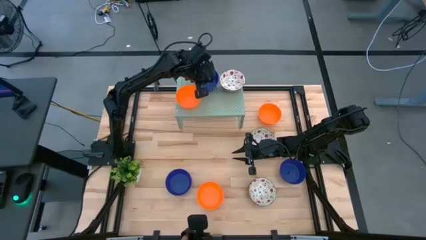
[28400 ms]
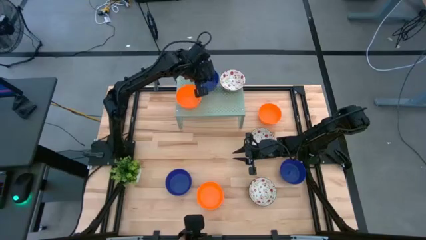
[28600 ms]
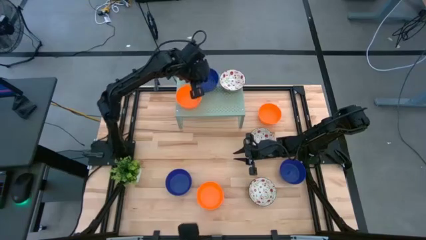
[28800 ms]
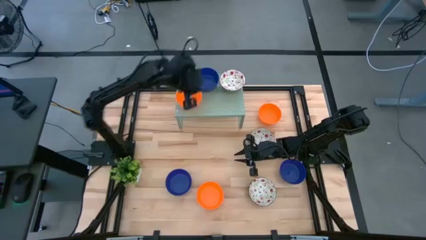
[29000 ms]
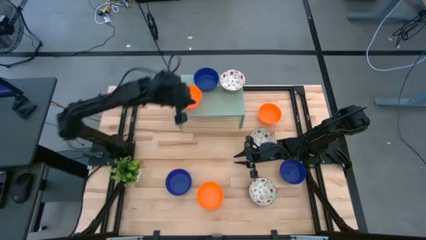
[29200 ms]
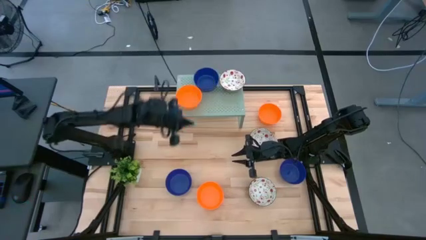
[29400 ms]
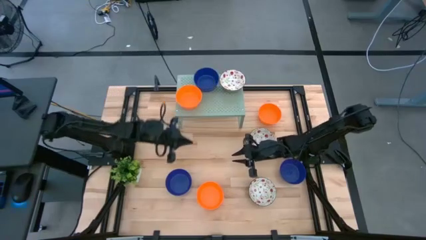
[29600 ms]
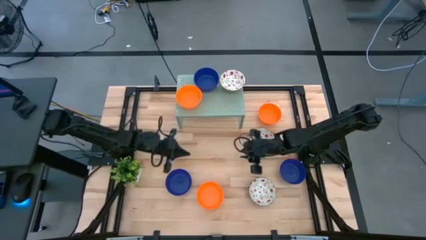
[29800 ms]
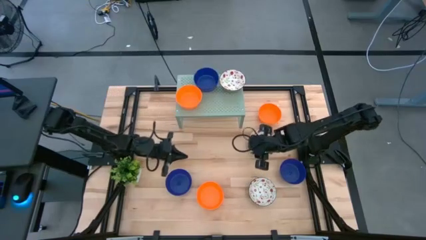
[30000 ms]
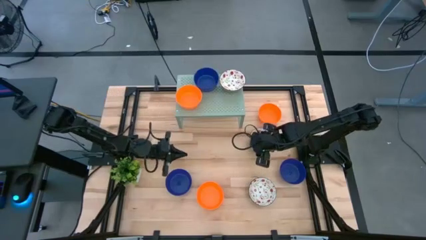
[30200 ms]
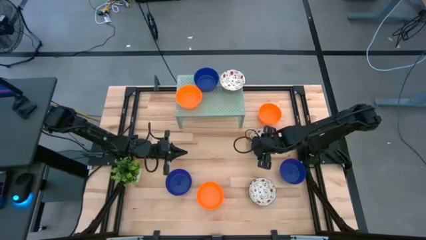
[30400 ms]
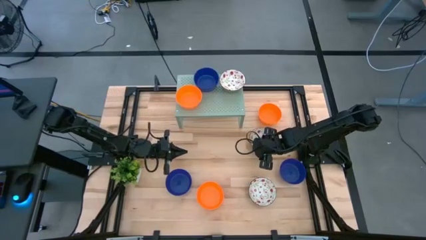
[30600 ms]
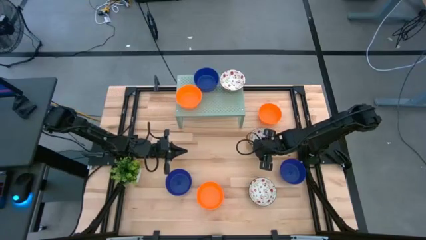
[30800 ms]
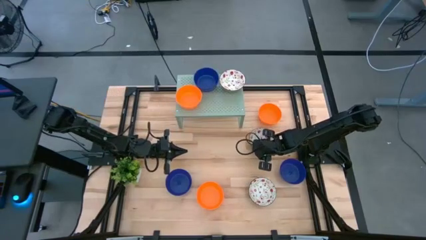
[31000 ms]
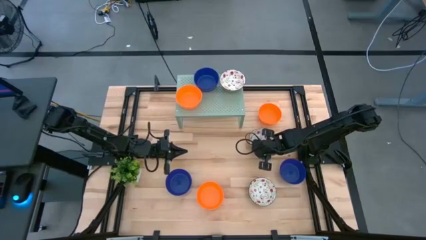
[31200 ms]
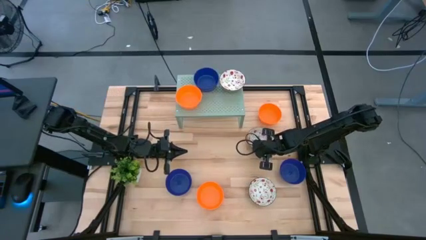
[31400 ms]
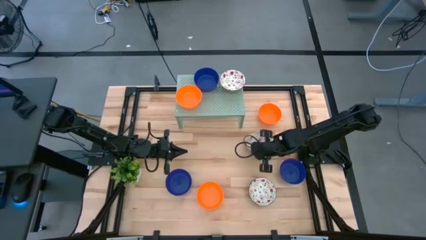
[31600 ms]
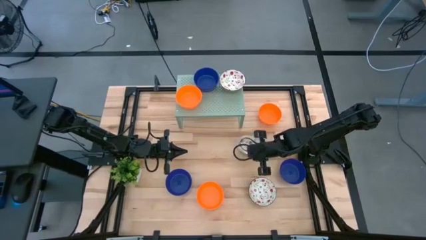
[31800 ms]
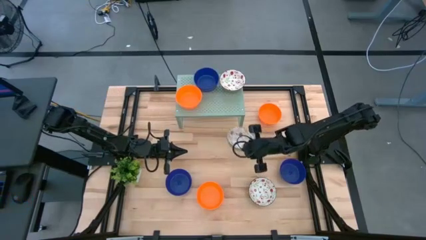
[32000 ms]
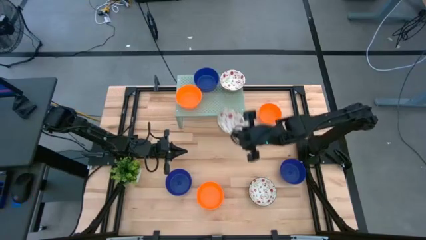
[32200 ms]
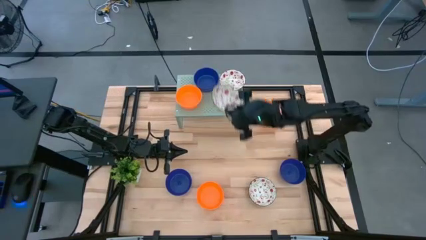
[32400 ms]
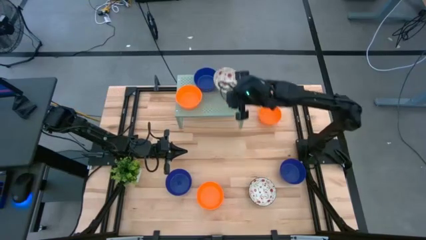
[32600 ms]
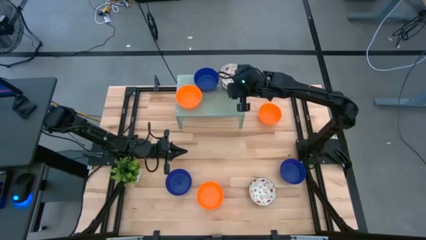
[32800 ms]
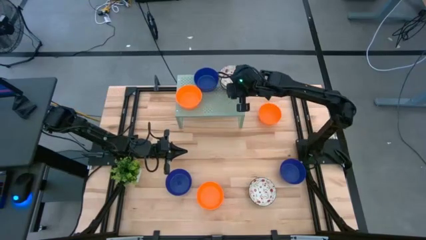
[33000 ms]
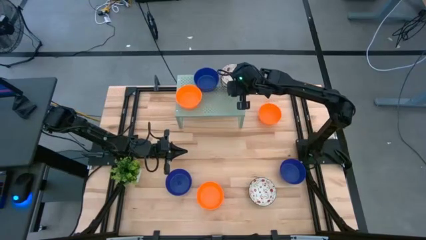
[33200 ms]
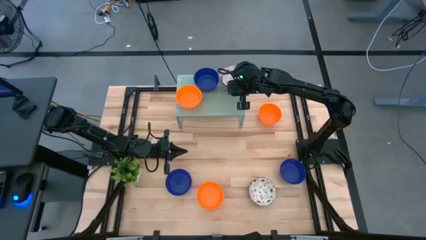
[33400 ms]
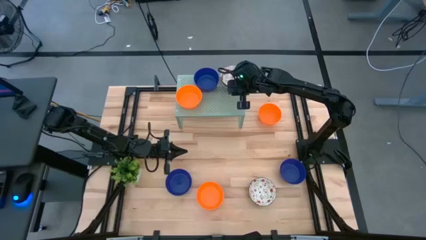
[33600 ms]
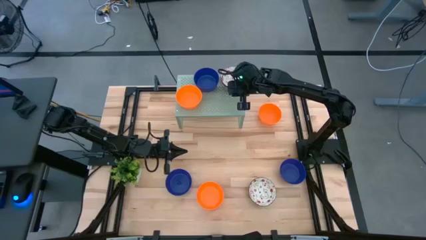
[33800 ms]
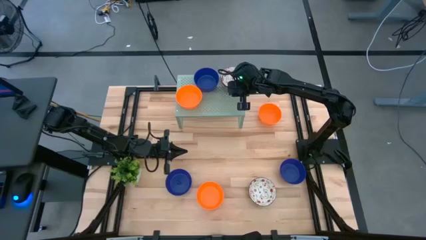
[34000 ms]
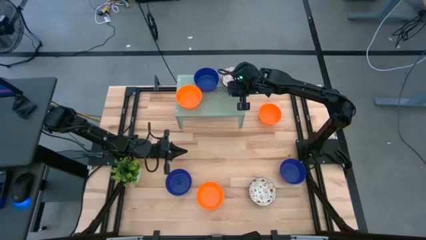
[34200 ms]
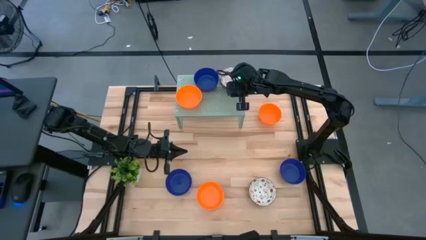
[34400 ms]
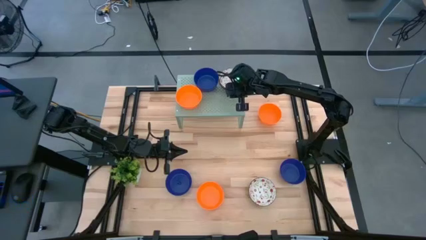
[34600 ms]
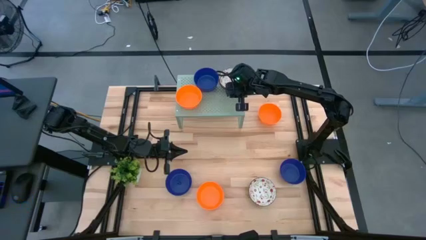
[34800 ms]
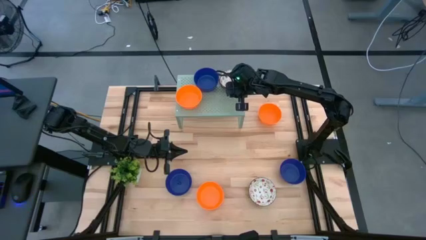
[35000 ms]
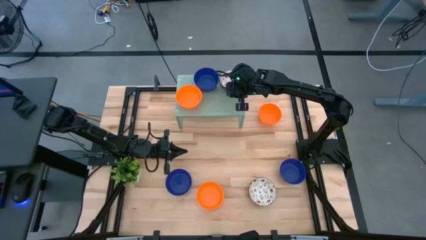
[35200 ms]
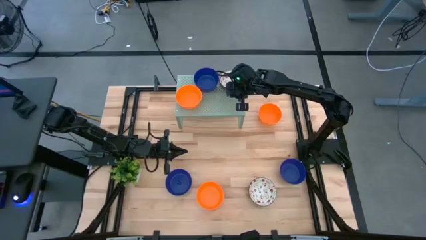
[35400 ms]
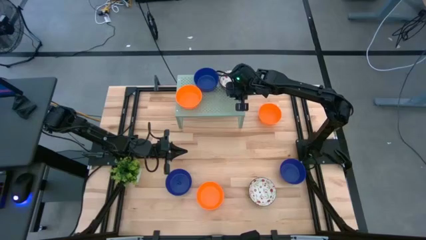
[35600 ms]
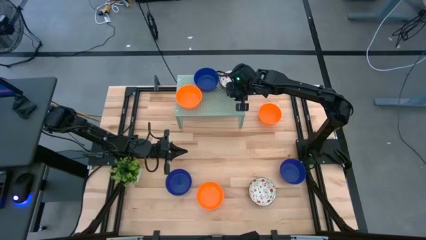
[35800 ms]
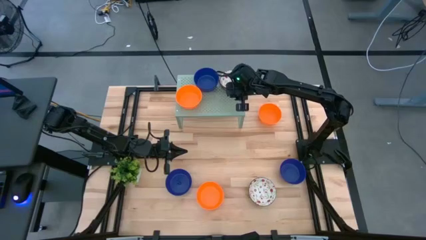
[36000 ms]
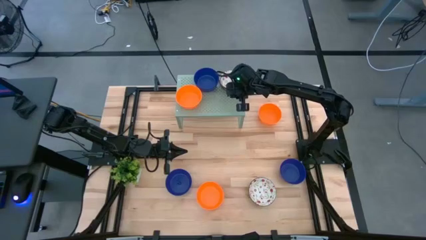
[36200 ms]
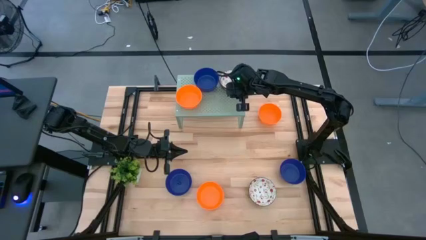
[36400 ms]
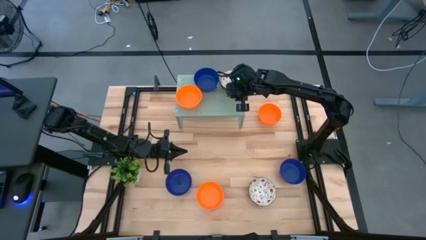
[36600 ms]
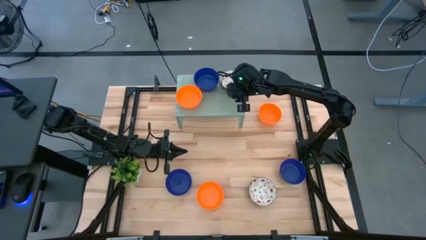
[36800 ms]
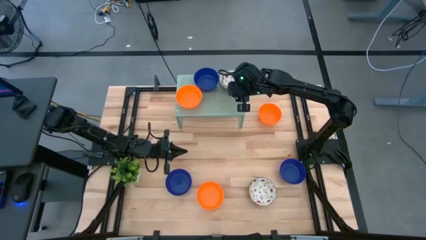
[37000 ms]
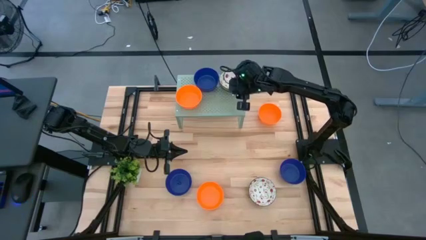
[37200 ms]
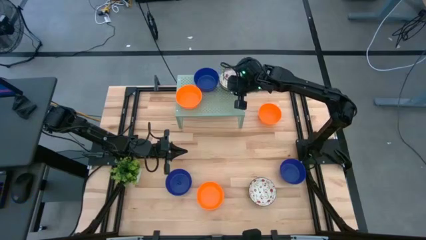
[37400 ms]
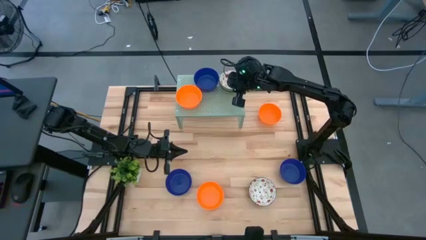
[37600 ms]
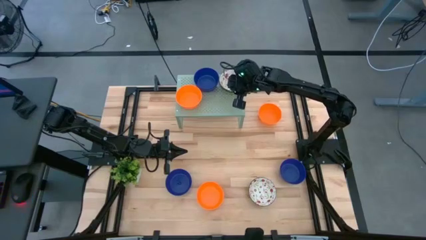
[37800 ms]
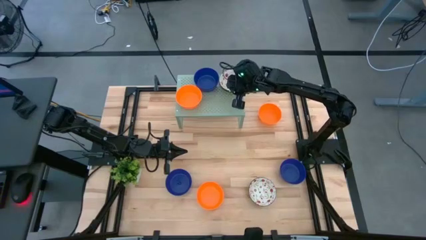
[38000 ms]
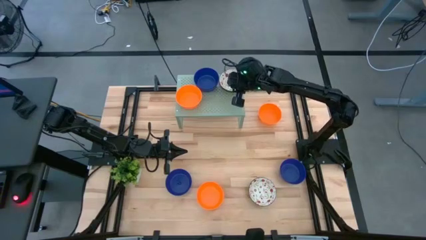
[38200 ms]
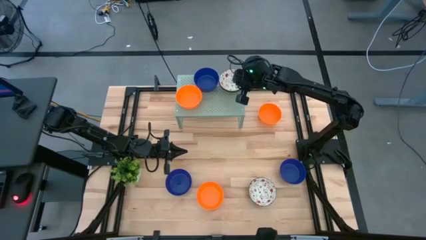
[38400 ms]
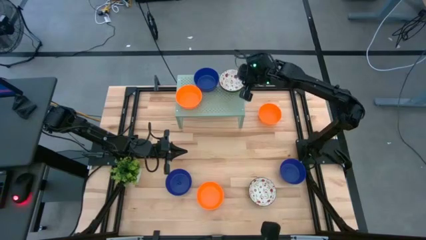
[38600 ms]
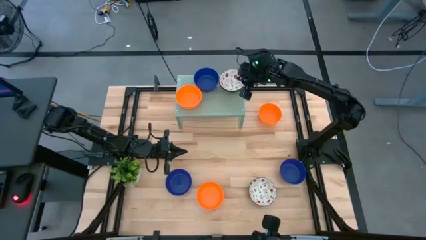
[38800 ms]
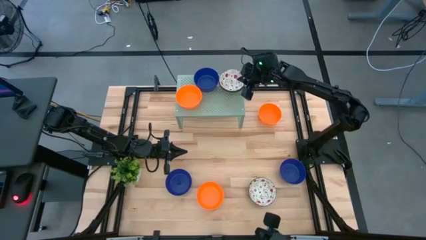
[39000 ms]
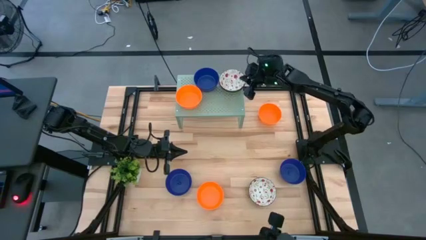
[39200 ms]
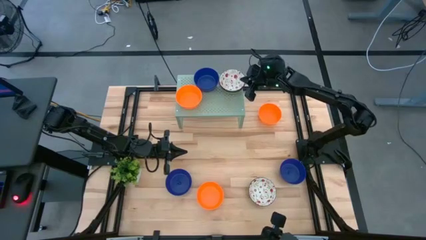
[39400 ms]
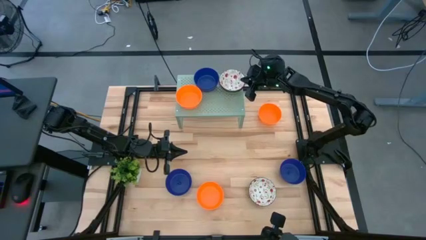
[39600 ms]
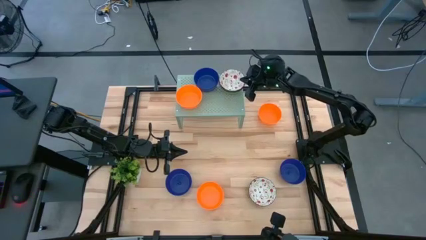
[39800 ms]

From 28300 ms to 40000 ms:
Task: Pick & Place Mini bowls
Stack the white bowl on the white bowl on the shelf

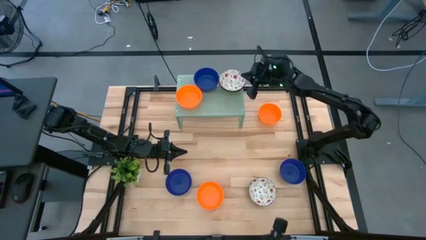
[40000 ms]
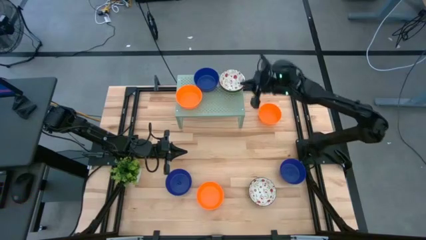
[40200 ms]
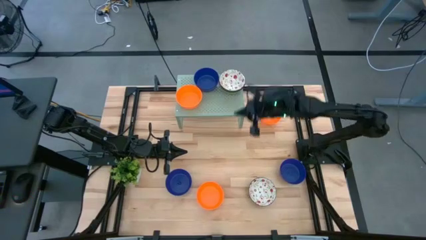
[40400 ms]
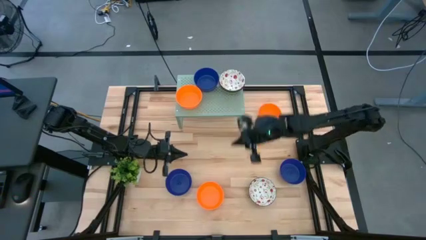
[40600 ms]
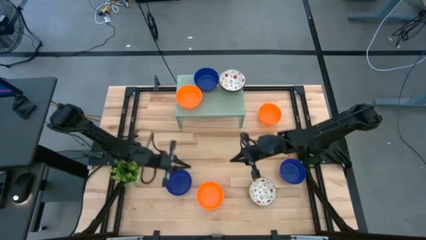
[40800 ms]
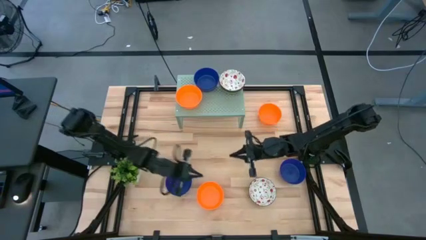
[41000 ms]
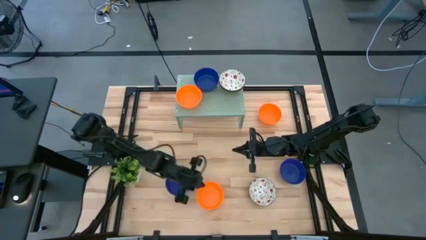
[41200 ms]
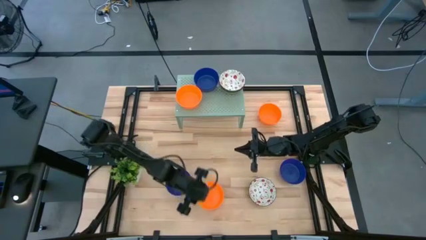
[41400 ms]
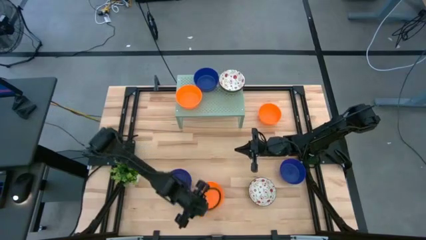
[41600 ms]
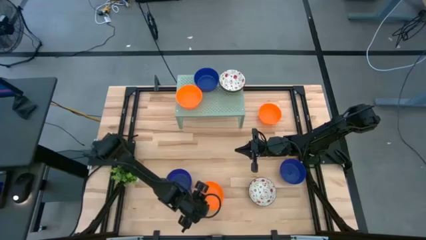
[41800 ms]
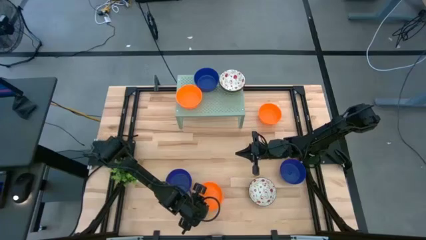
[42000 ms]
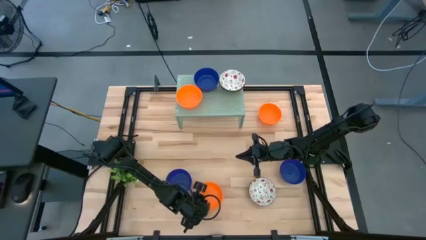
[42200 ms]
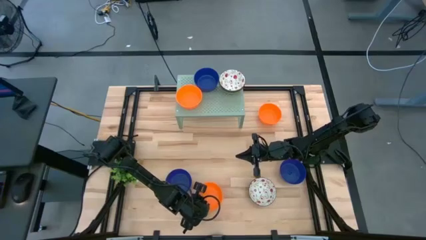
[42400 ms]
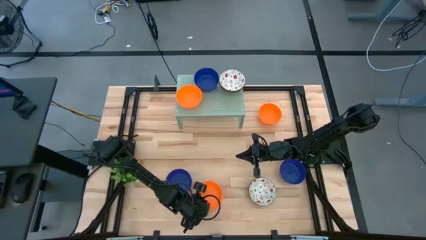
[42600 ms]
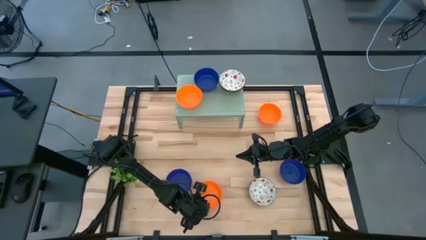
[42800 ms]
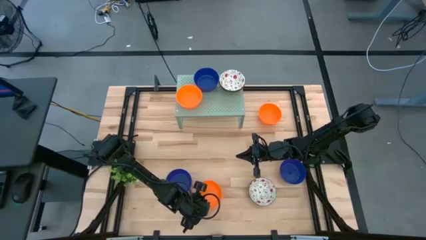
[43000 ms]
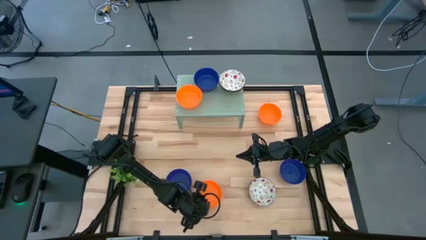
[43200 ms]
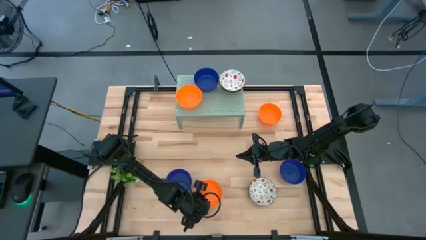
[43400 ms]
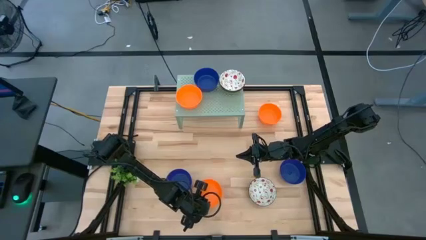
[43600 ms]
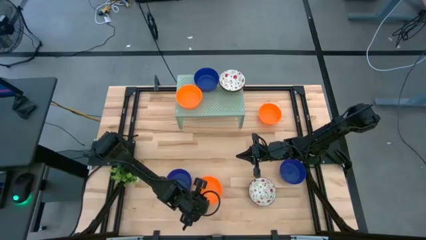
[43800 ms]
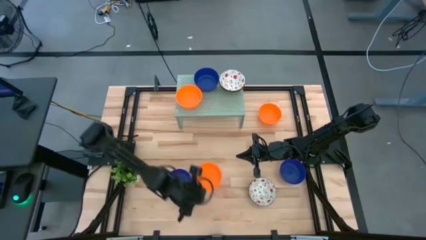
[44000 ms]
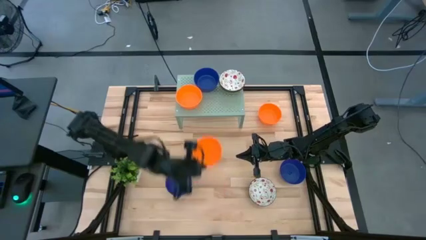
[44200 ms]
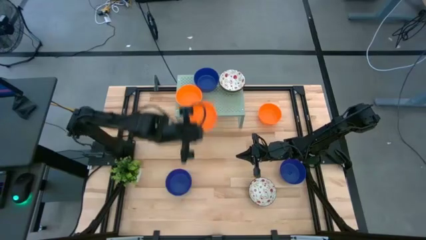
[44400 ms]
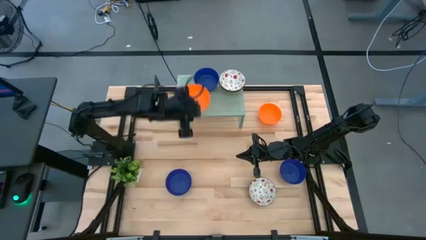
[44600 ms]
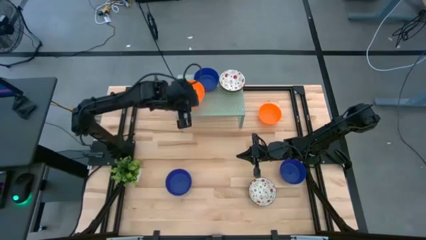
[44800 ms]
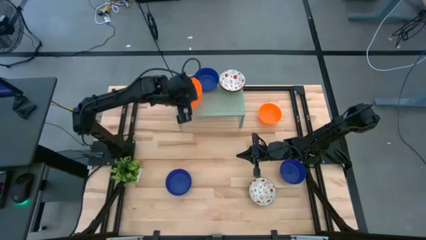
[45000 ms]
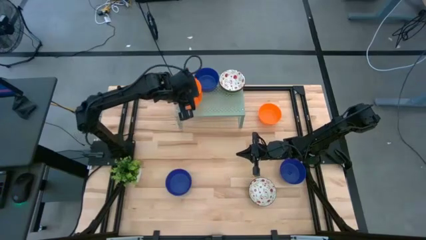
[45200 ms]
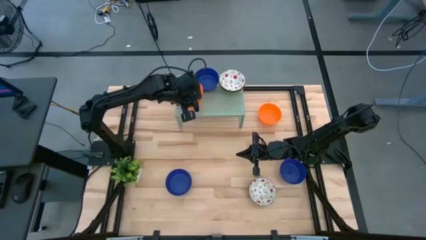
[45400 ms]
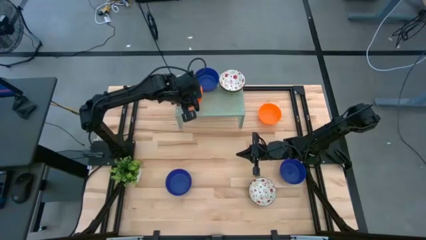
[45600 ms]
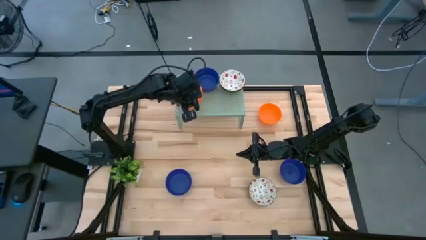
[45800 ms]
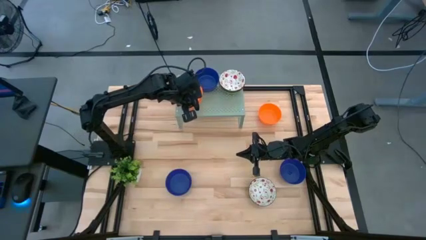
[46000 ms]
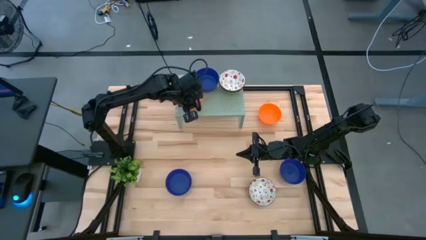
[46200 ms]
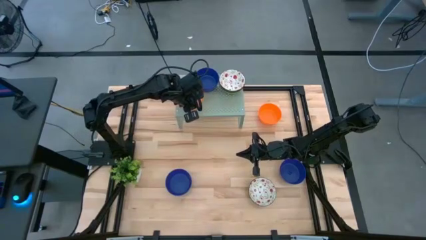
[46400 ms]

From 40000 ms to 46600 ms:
Stack the orange bowl on the orange bowl on the shelf
